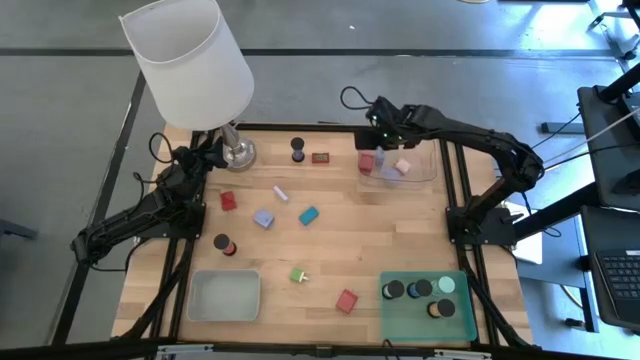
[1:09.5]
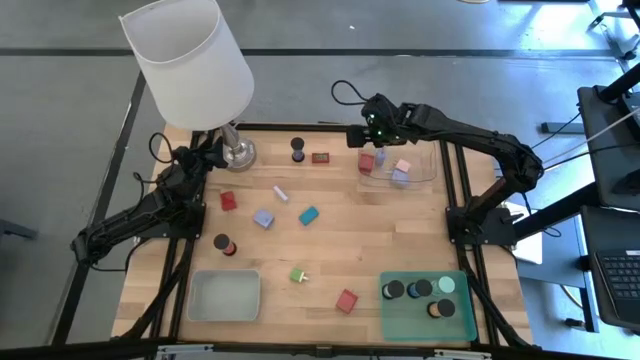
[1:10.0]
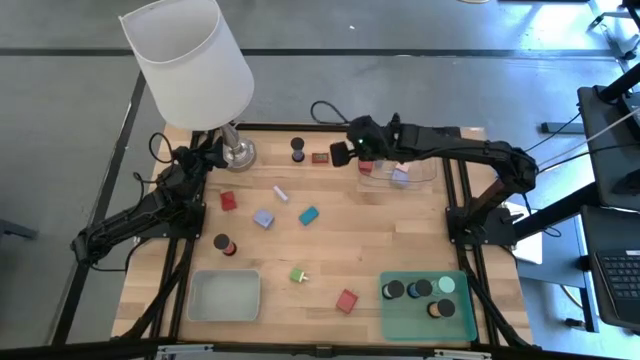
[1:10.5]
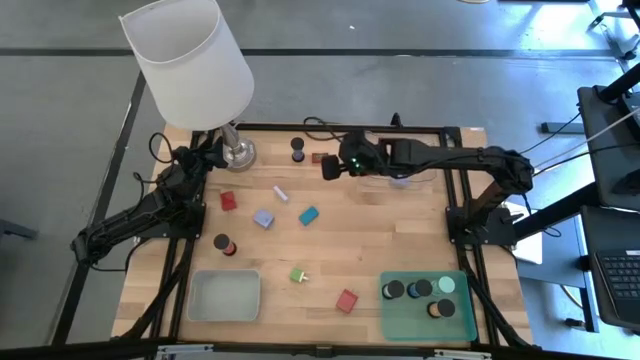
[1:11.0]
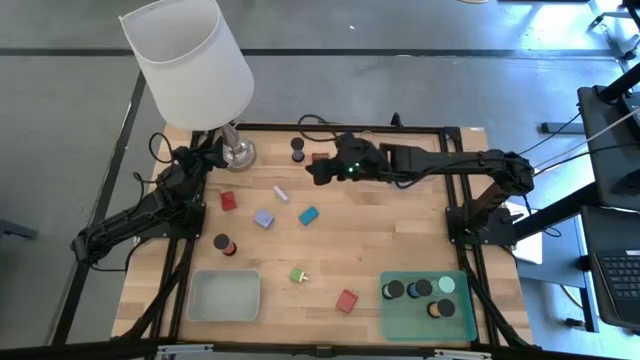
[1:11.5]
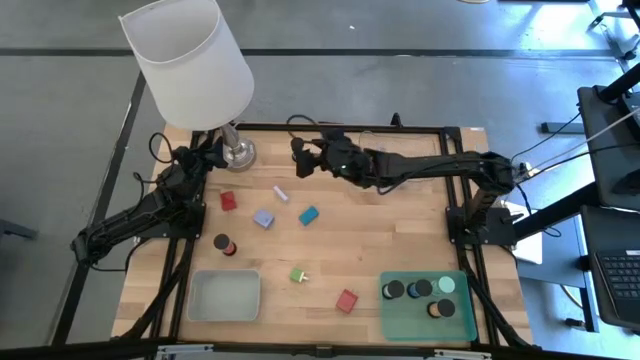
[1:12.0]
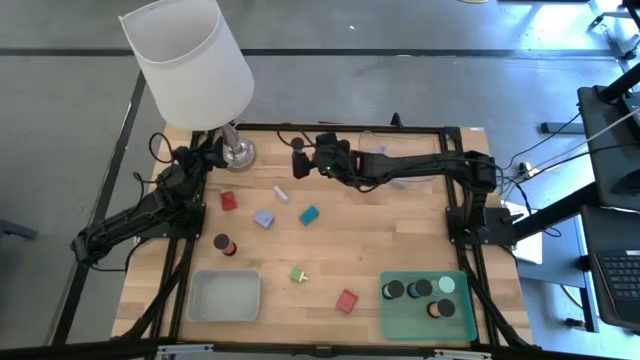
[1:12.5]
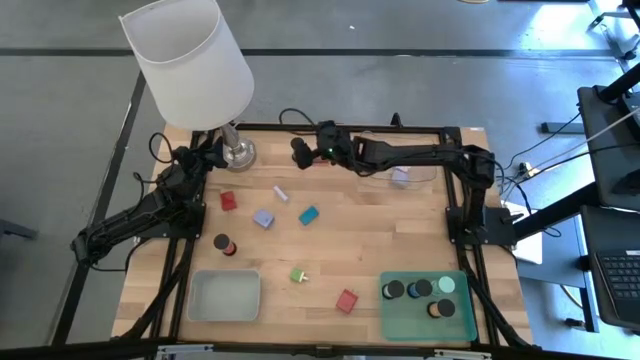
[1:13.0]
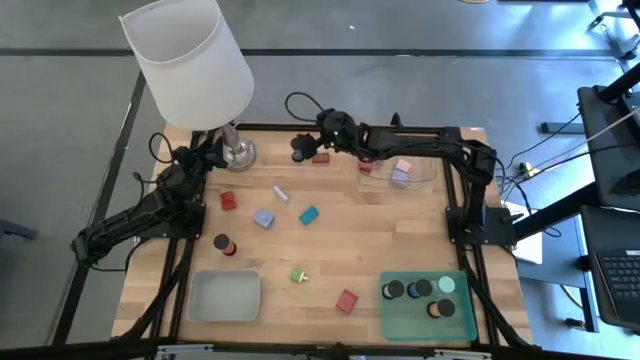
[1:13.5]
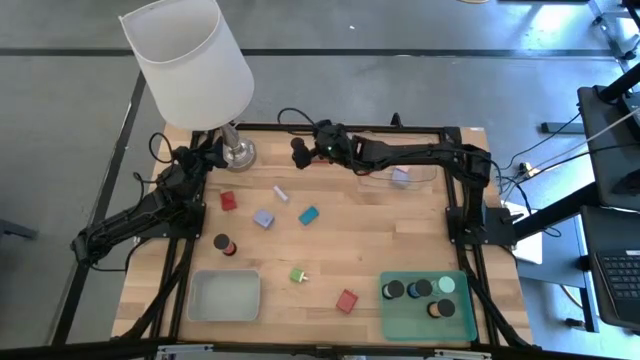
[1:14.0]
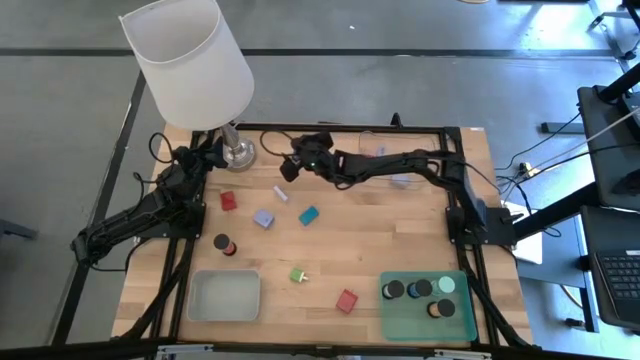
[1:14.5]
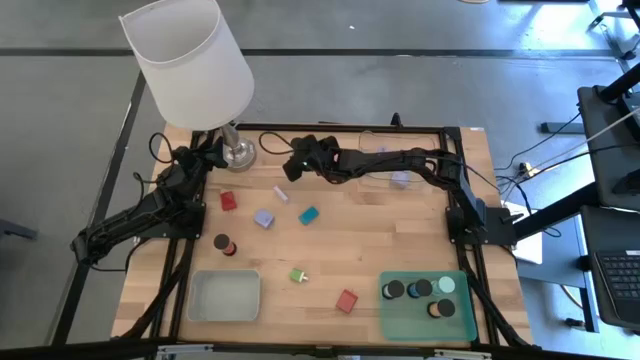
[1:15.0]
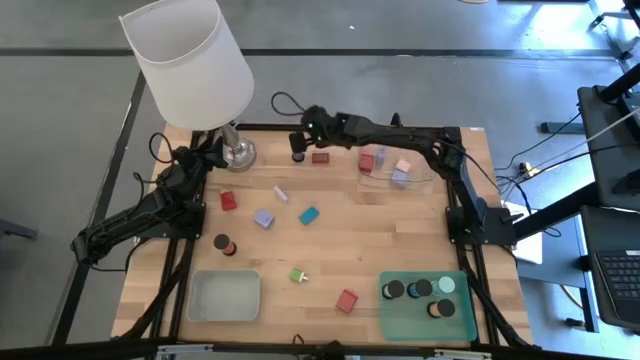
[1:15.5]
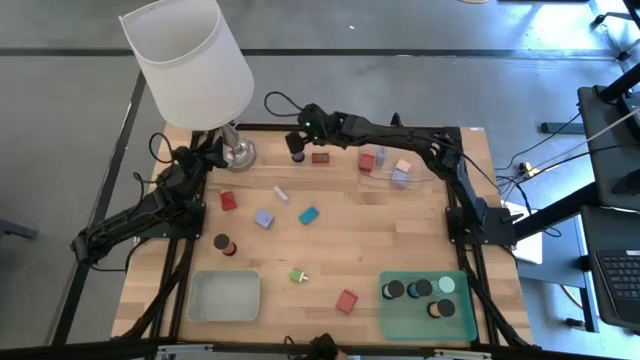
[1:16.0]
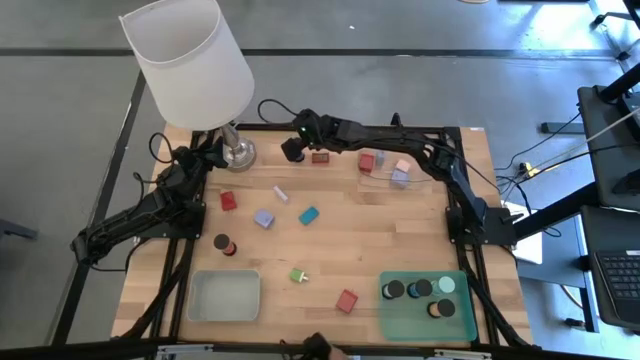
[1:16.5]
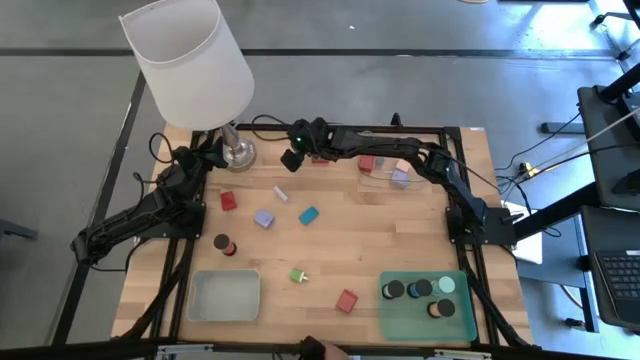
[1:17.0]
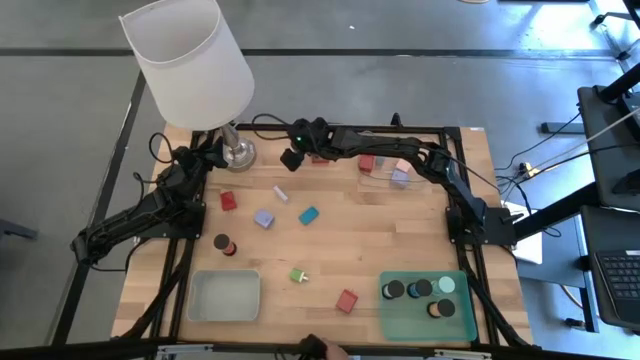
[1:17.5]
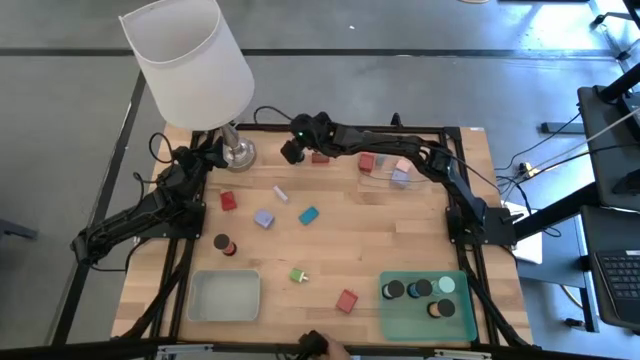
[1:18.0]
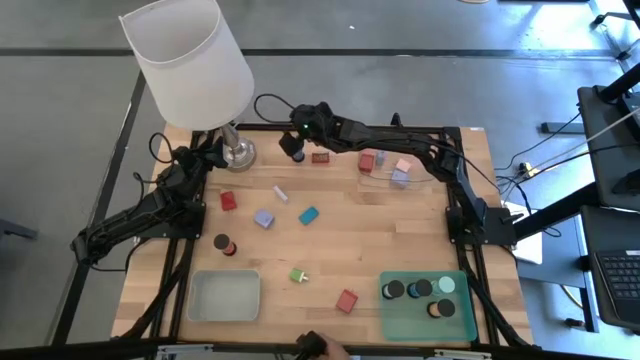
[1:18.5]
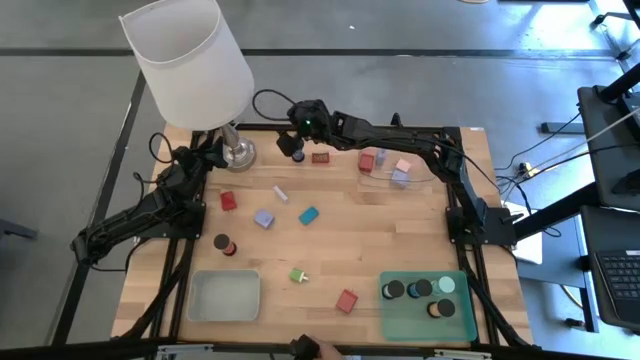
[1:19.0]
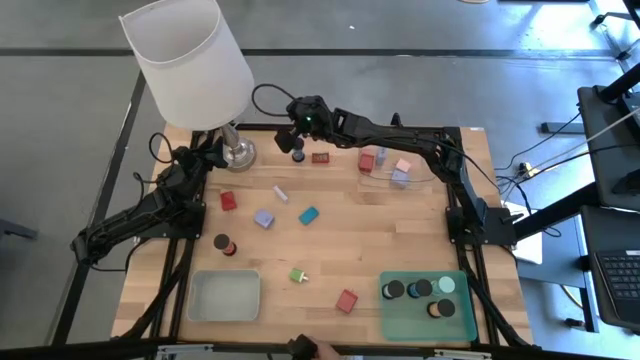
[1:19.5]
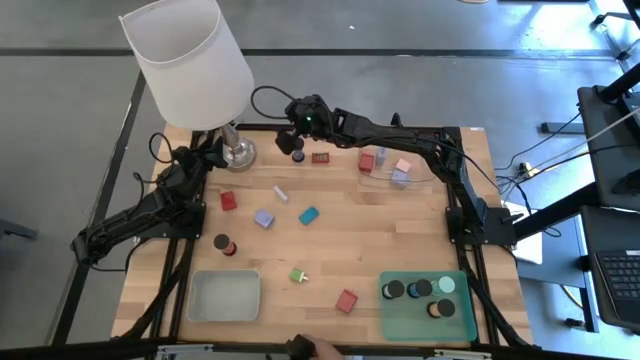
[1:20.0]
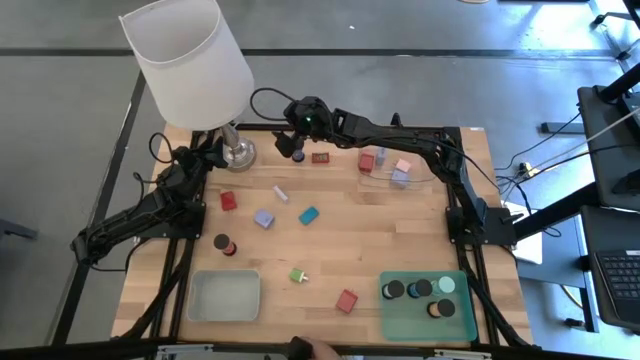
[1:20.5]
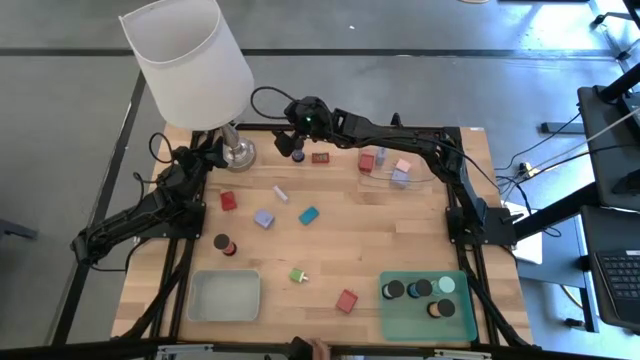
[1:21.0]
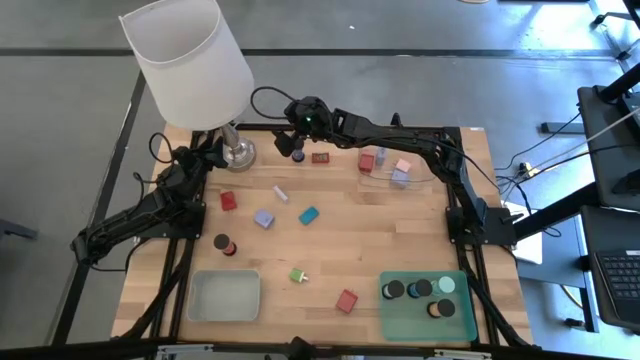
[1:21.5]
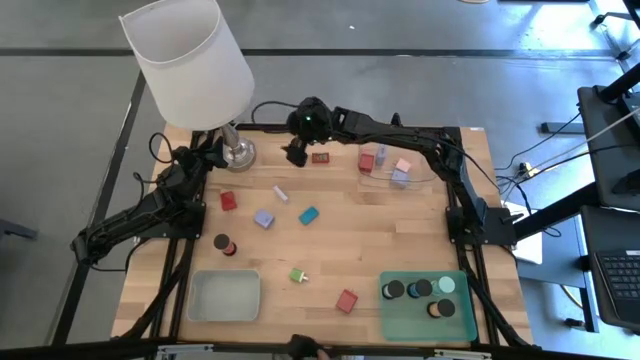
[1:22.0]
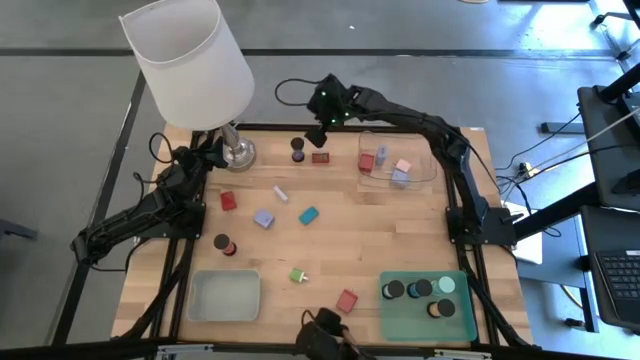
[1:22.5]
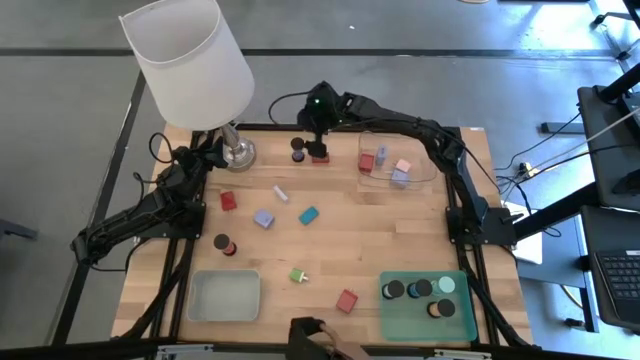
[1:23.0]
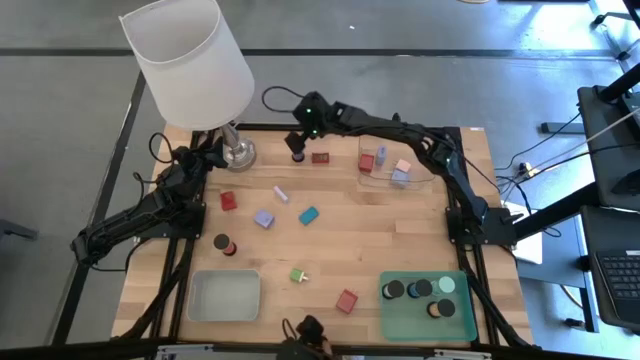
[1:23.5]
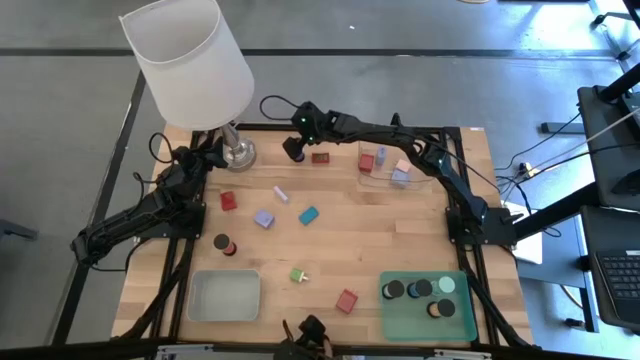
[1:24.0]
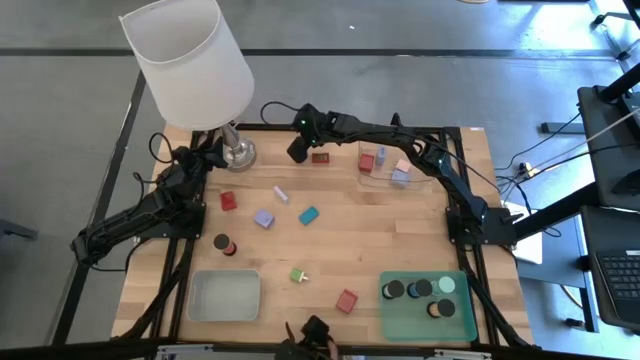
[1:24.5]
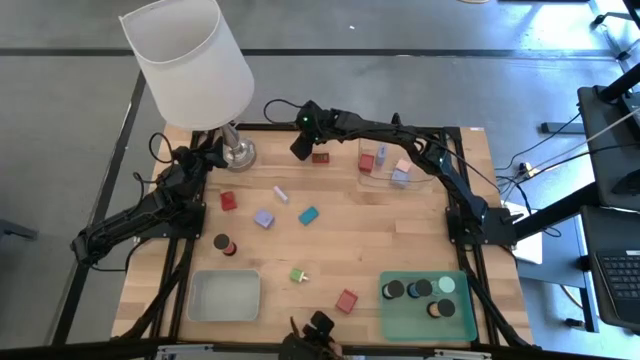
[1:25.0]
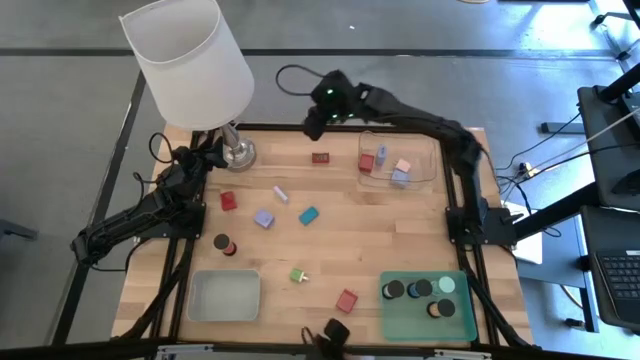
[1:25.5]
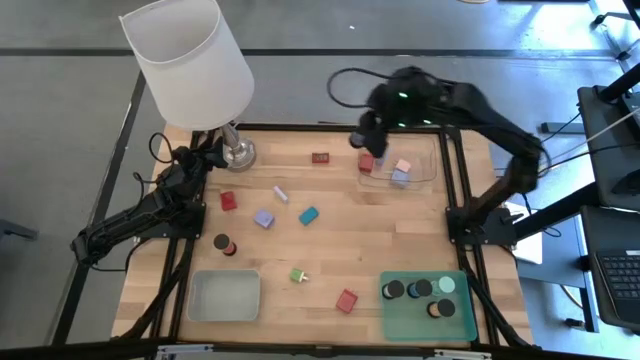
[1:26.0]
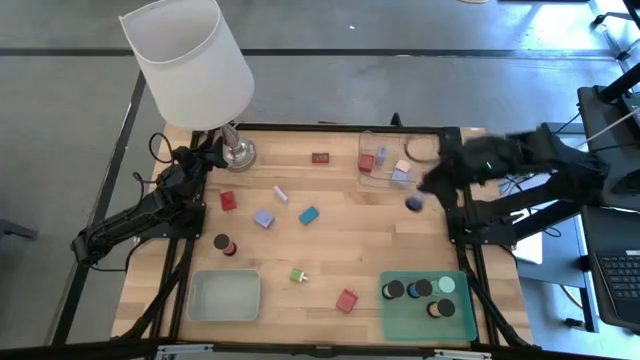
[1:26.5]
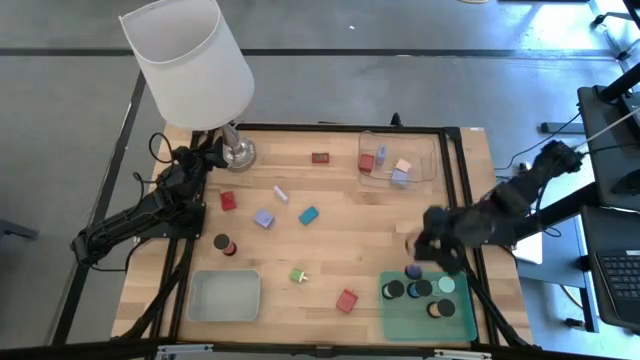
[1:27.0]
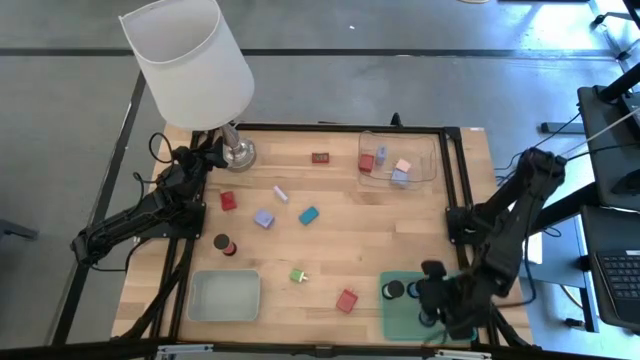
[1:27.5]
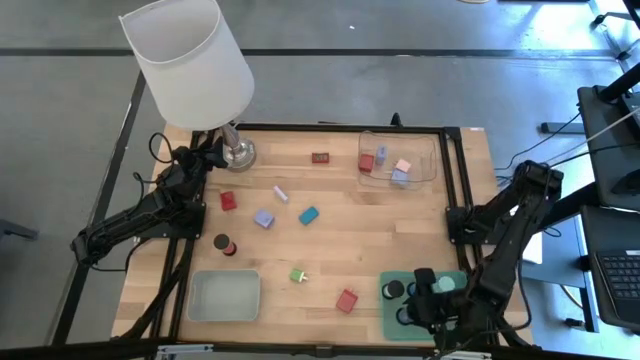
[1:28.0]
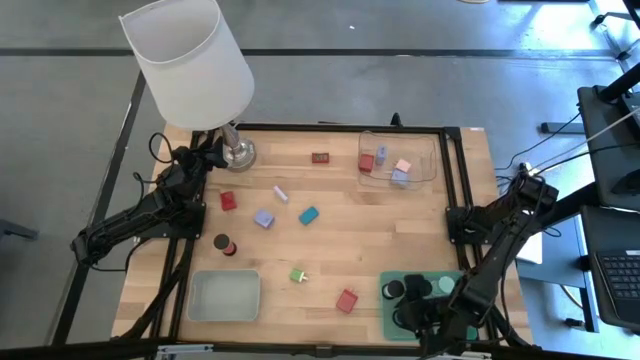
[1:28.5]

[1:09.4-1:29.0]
Task: Pick & Place Office items
Put the blue hourglass into the green bin

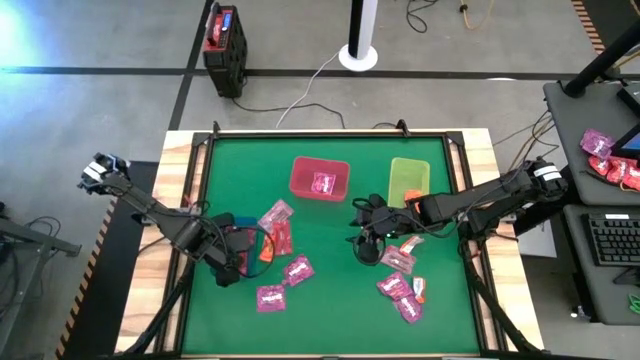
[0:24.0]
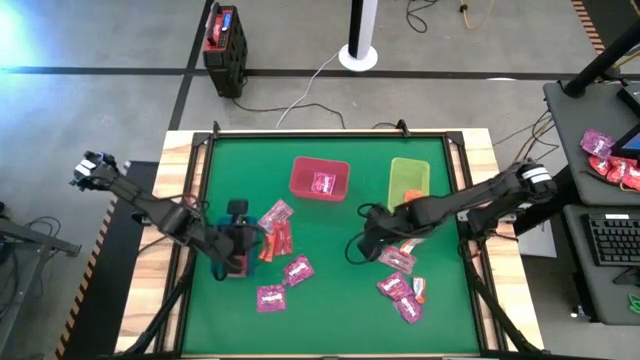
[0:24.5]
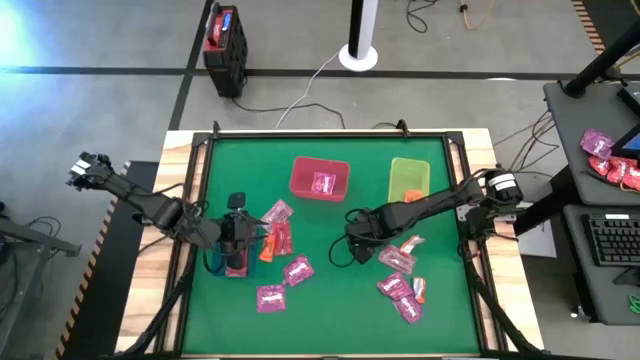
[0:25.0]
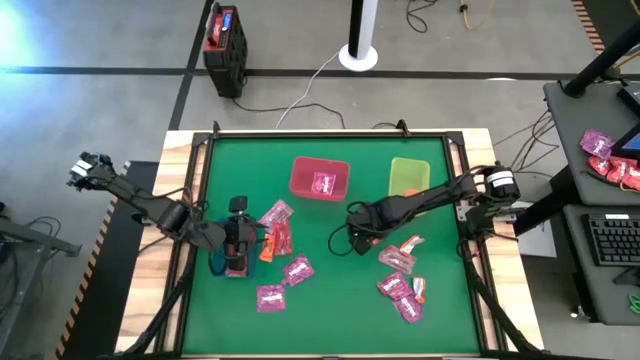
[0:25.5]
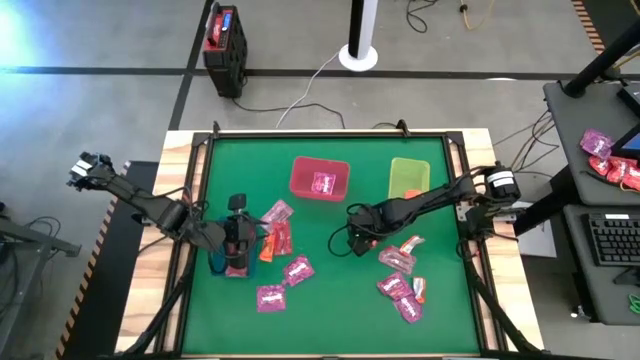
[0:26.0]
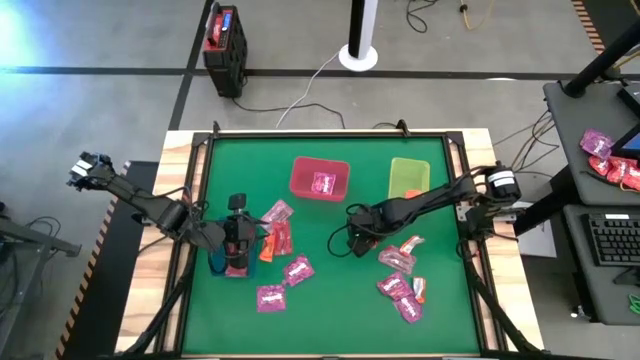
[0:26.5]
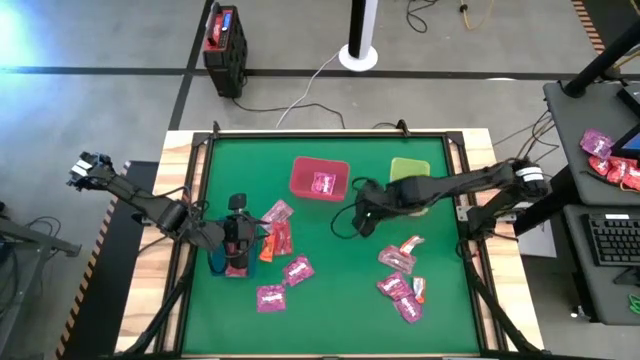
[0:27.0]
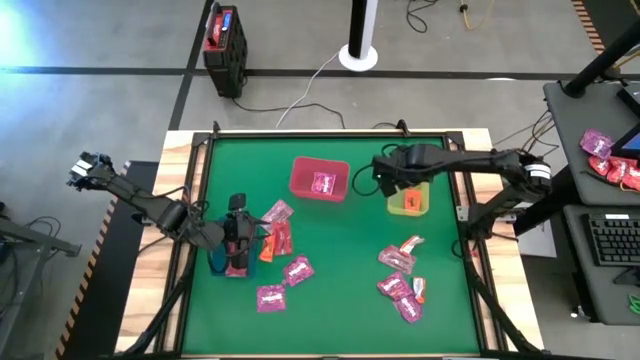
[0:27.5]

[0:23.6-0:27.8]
Task: Sort candy by brand, put in halloween buckets
Put the orange chocolate into the yellow bin
